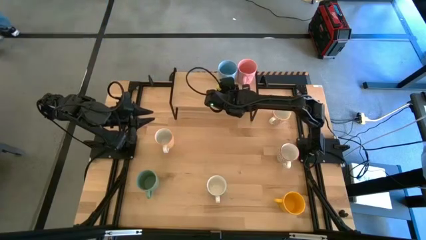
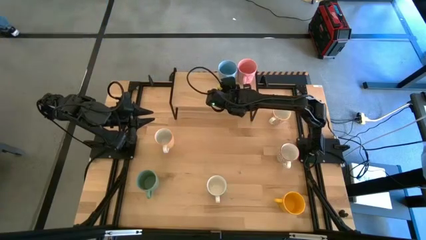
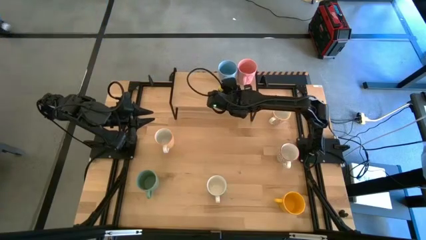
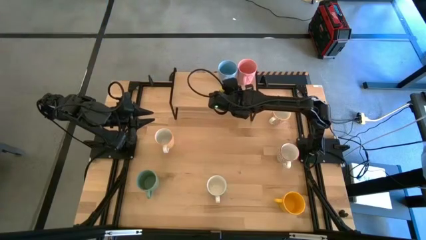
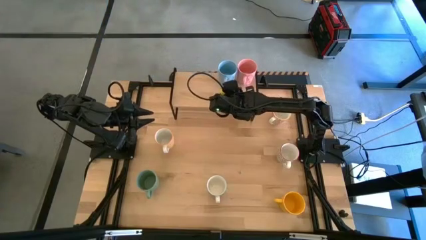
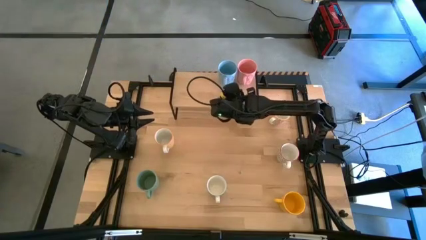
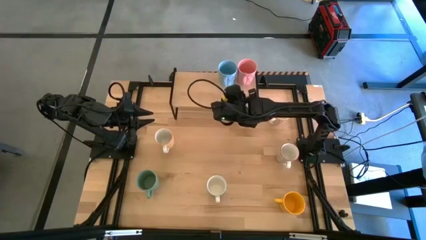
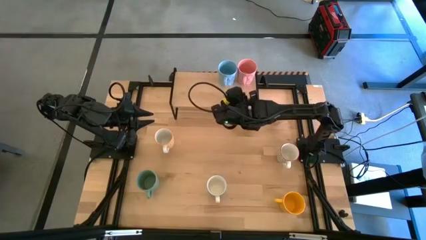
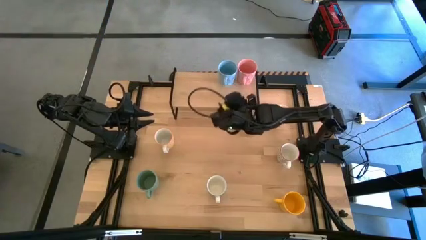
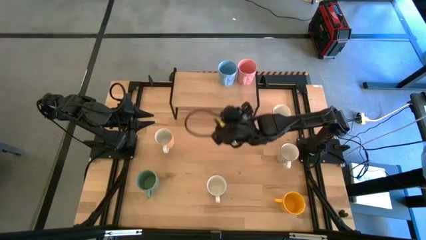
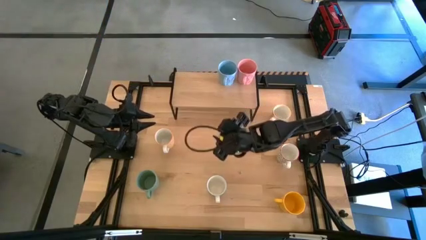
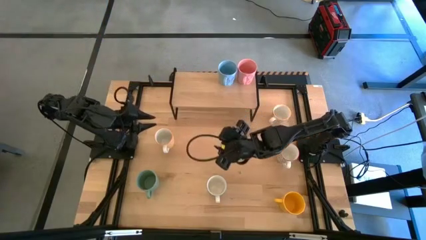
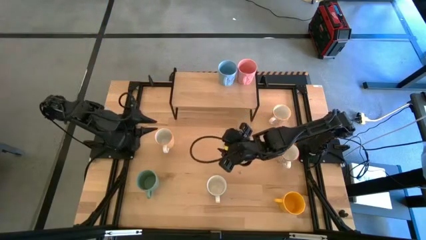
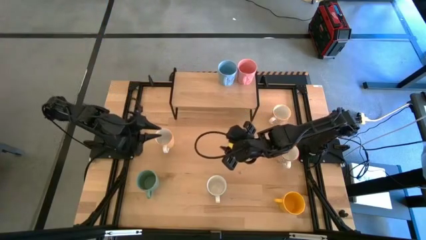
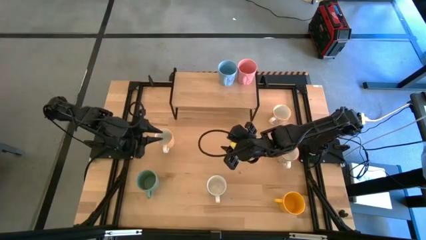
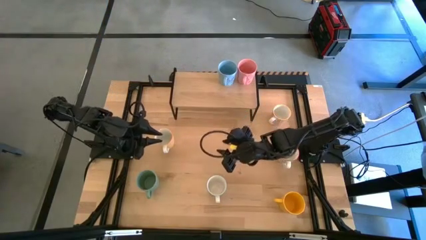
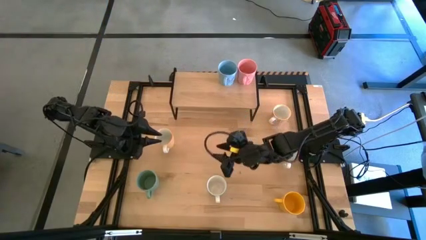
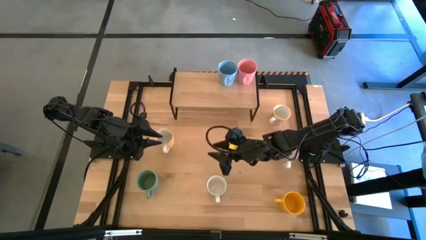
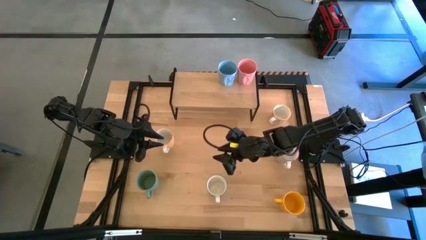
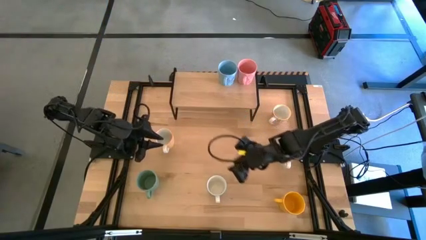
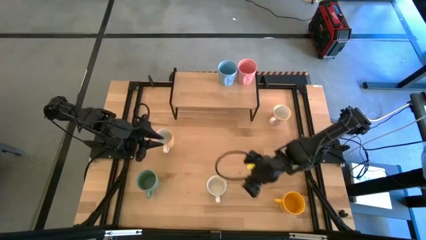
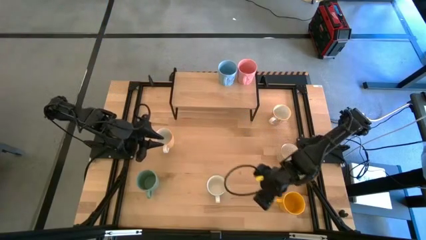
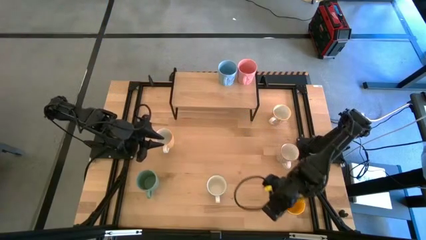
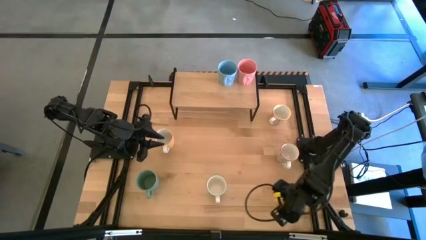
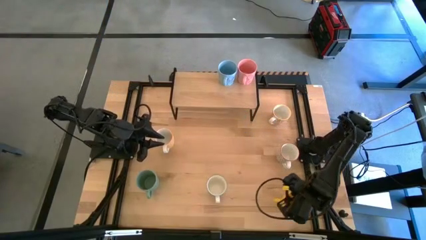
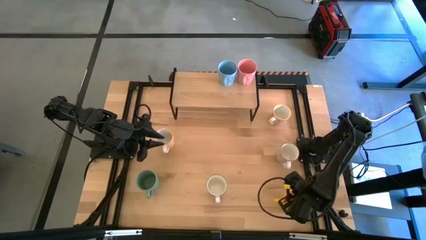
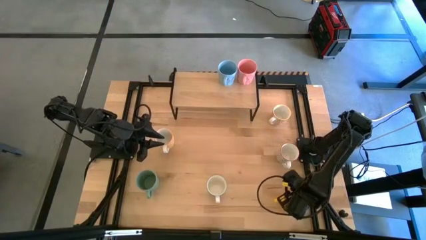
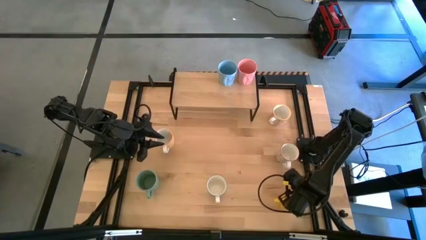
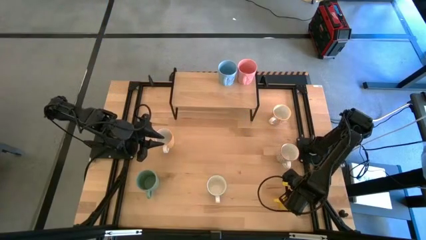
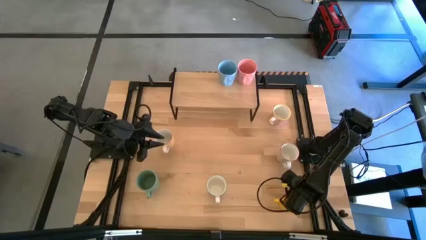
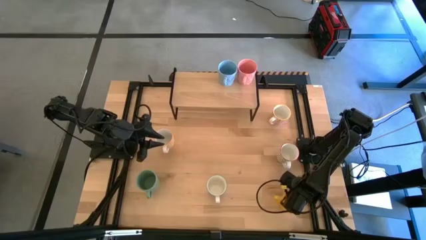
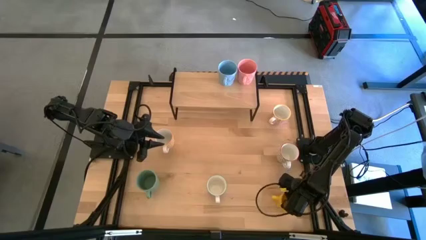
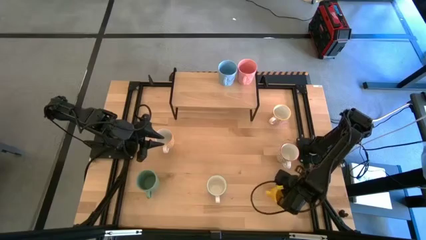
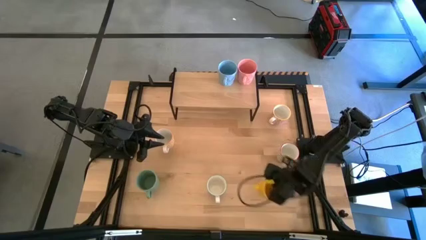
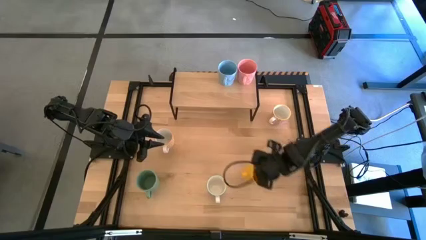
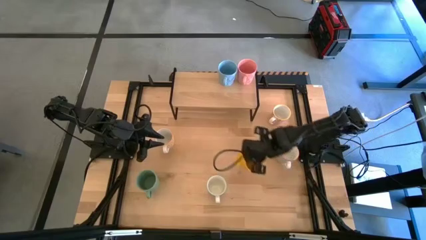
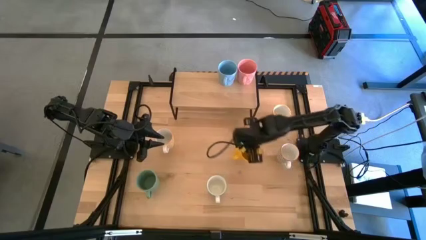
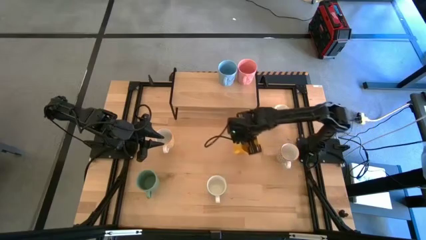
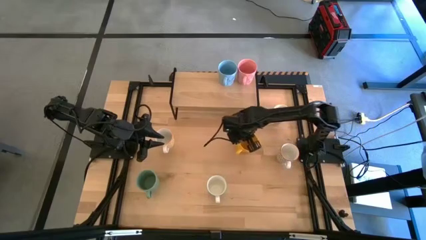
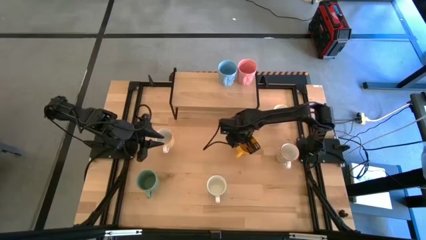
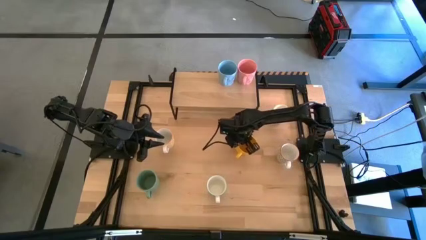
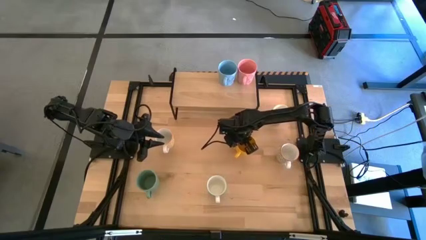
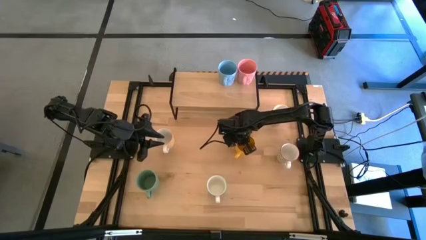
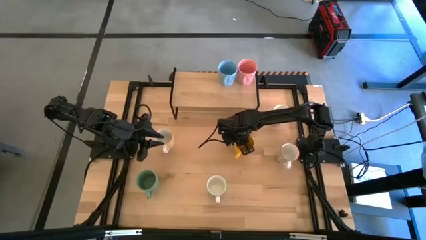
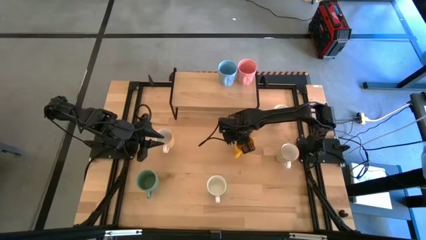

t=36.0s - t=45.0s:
Task: Place coffee mugs
Move the yellow mug to the center of the table

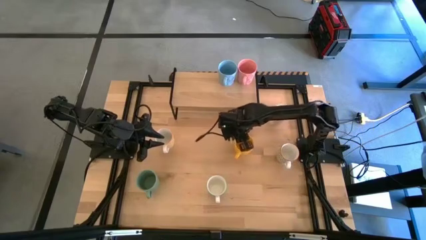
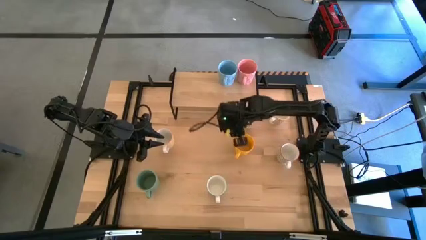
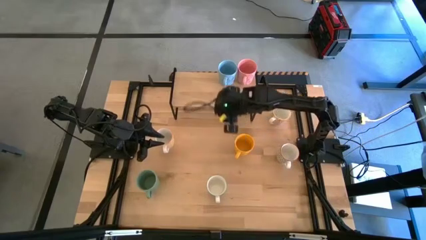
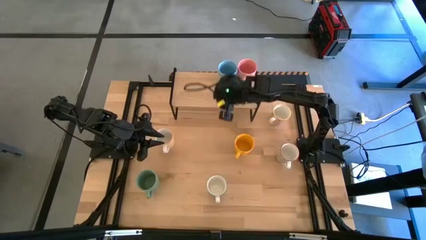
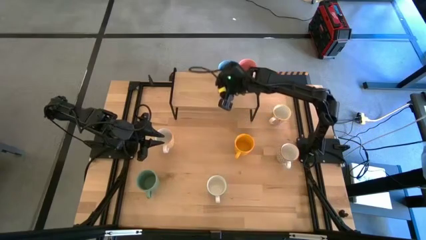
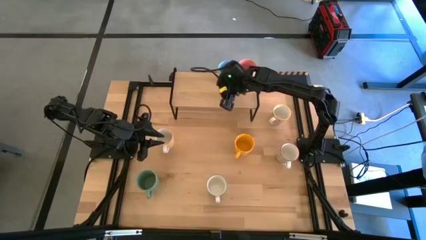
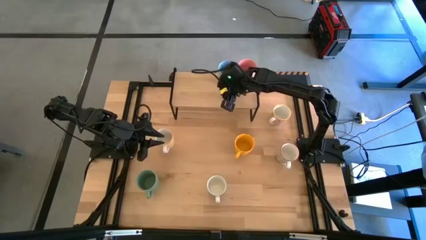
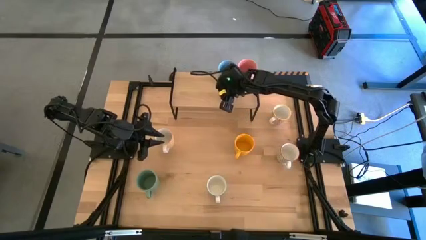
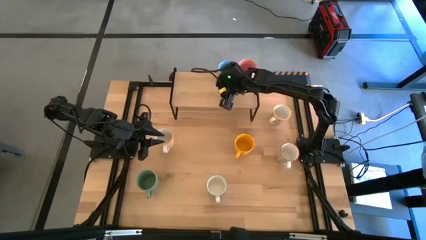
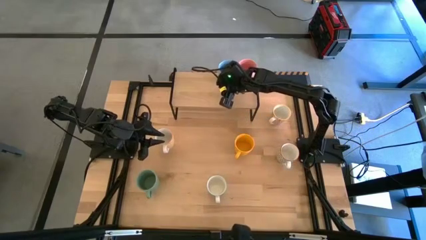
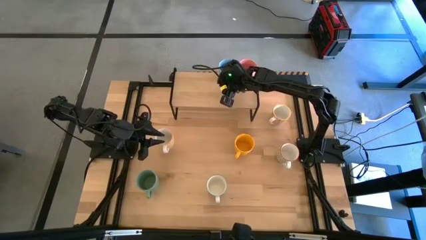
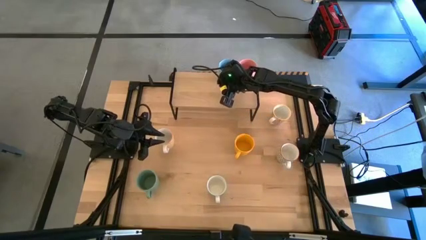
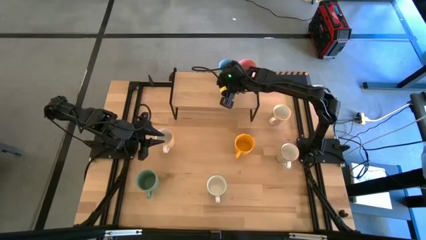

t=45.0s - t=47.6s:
Adjust the blue mug on the shelf
